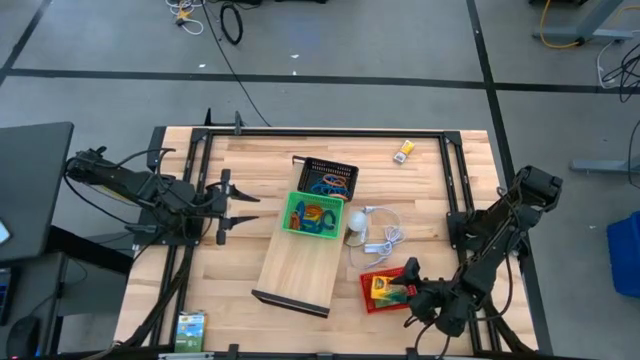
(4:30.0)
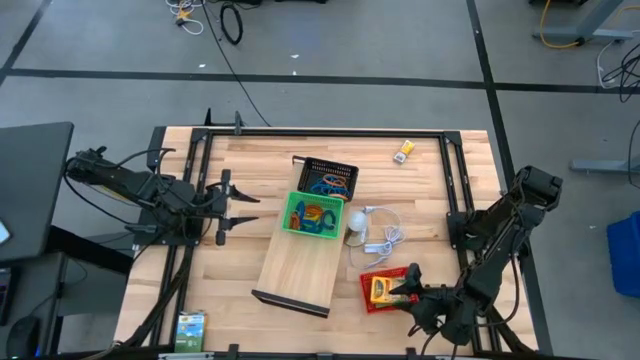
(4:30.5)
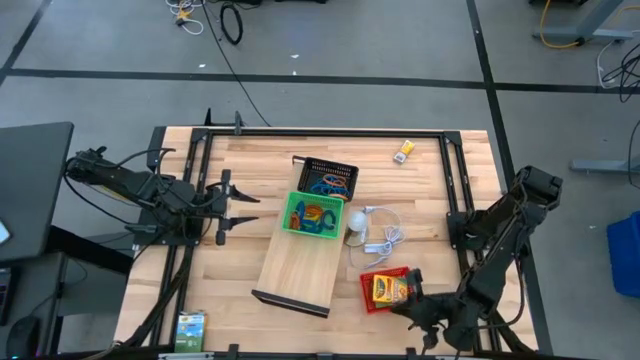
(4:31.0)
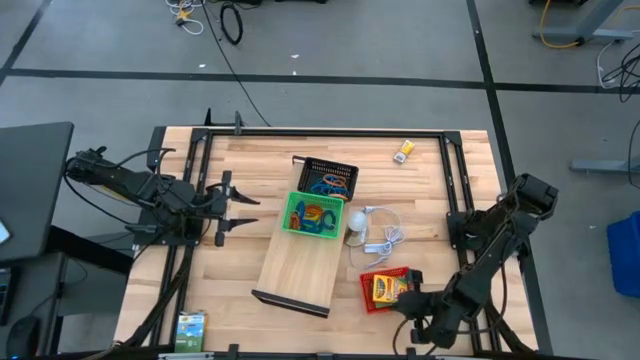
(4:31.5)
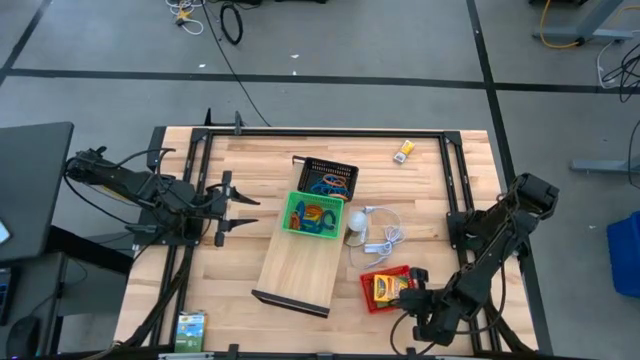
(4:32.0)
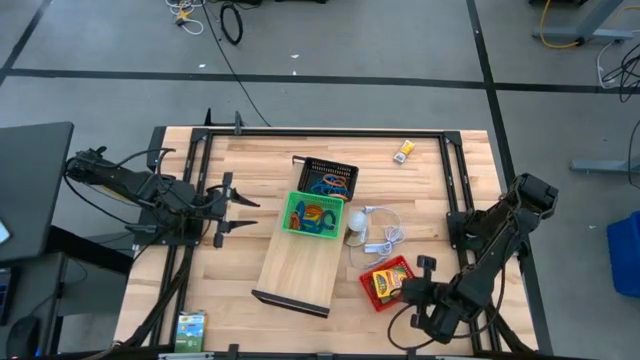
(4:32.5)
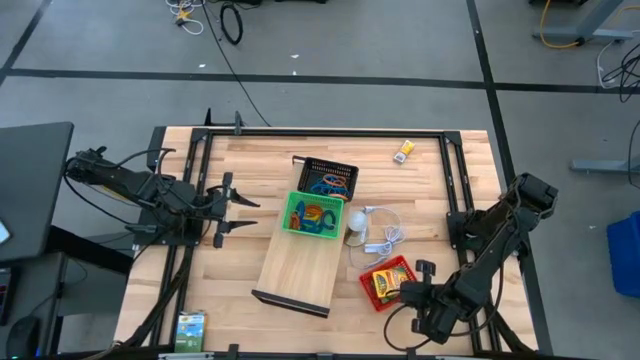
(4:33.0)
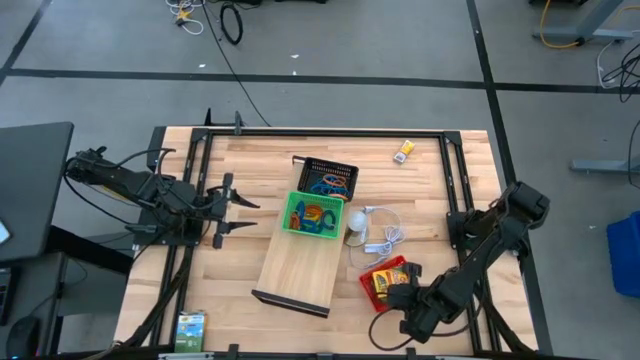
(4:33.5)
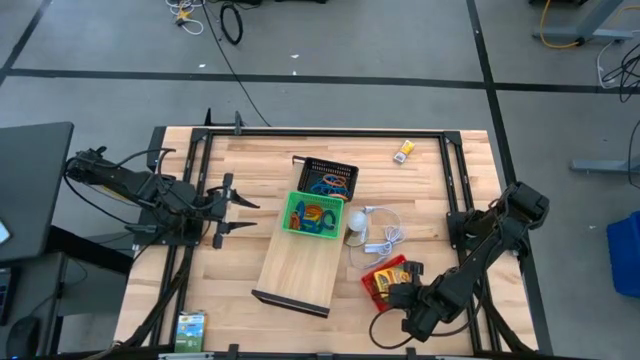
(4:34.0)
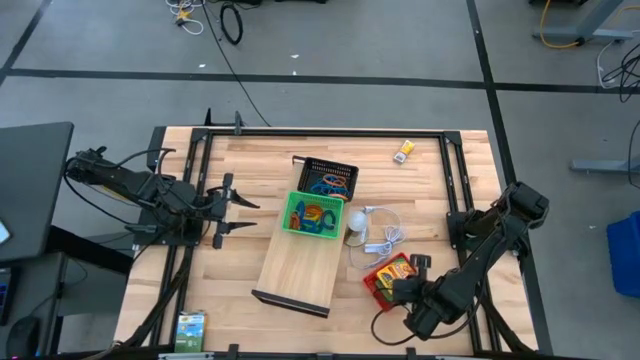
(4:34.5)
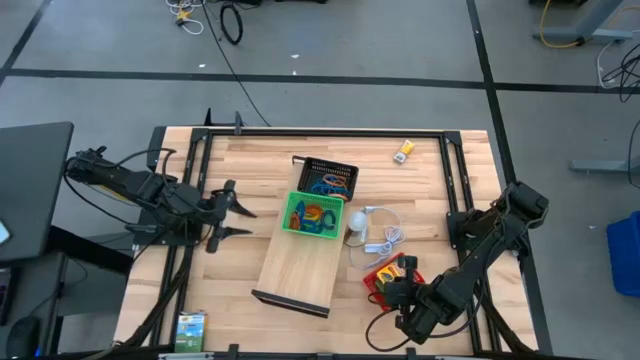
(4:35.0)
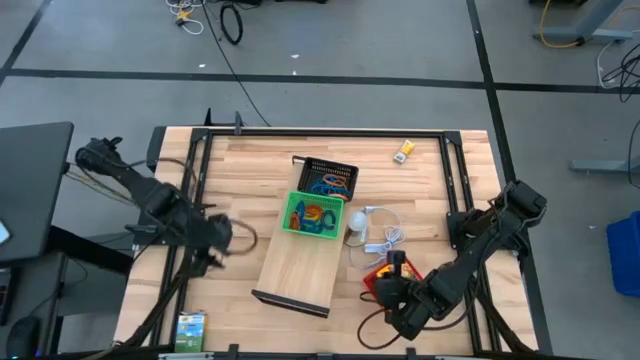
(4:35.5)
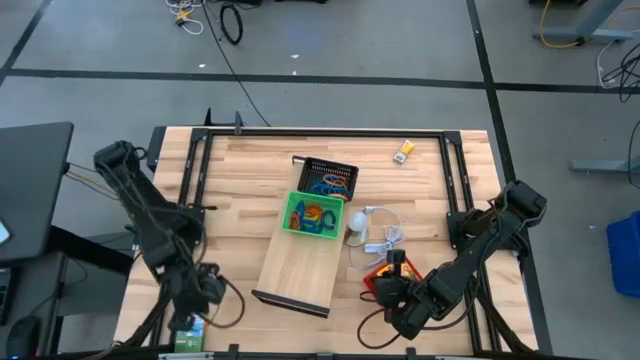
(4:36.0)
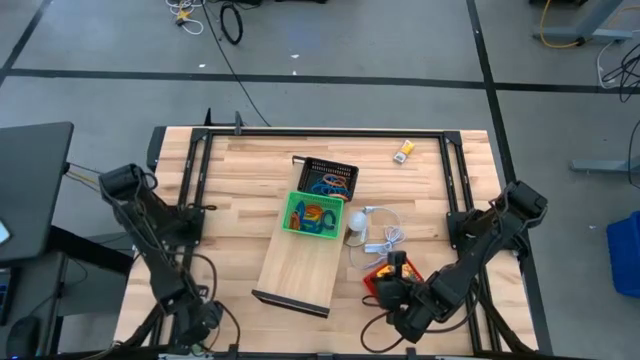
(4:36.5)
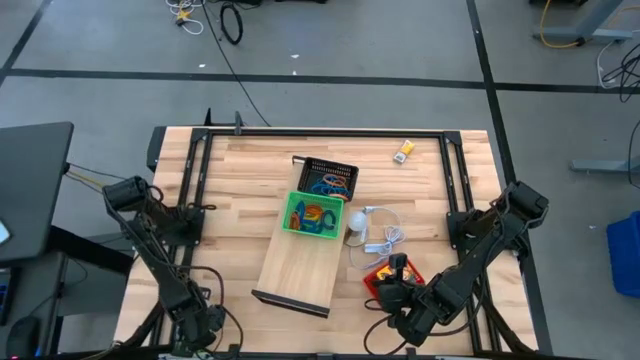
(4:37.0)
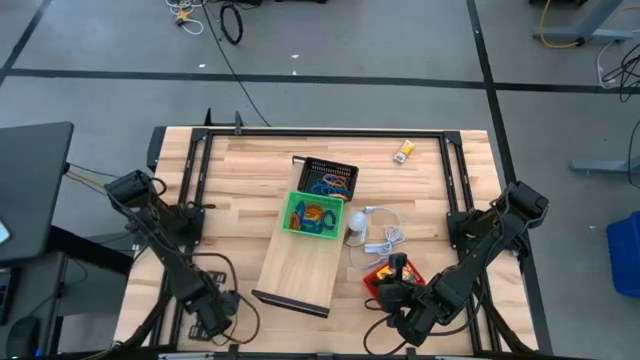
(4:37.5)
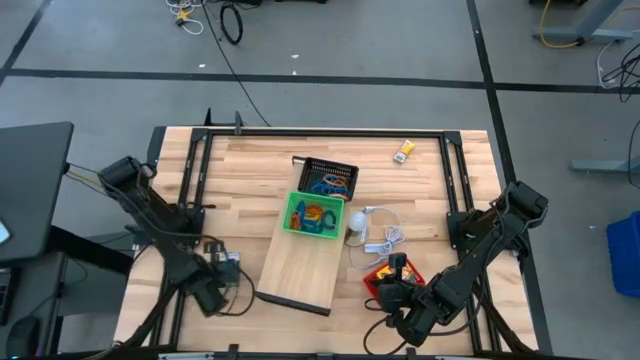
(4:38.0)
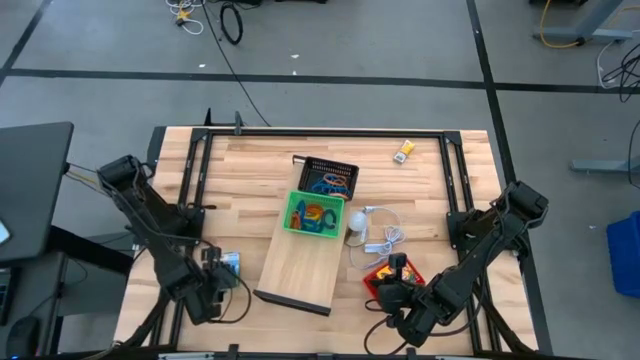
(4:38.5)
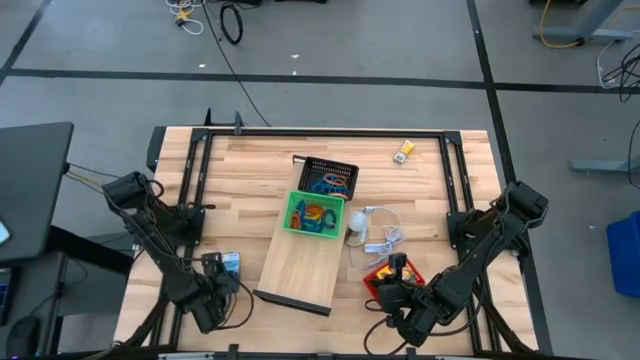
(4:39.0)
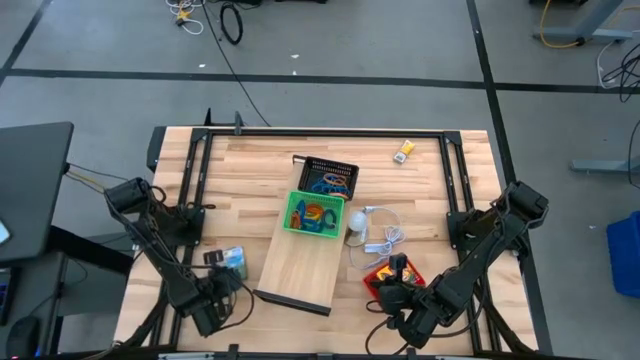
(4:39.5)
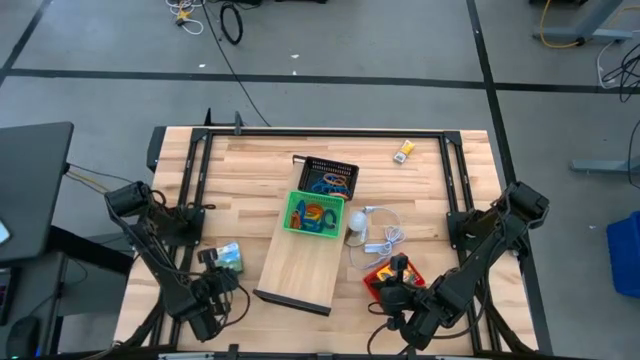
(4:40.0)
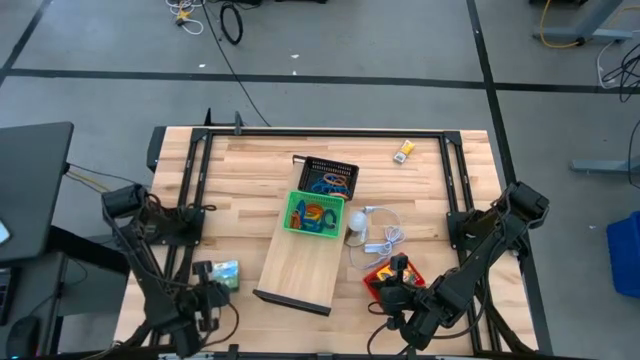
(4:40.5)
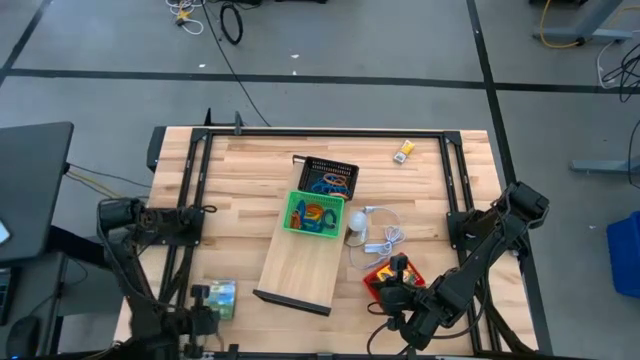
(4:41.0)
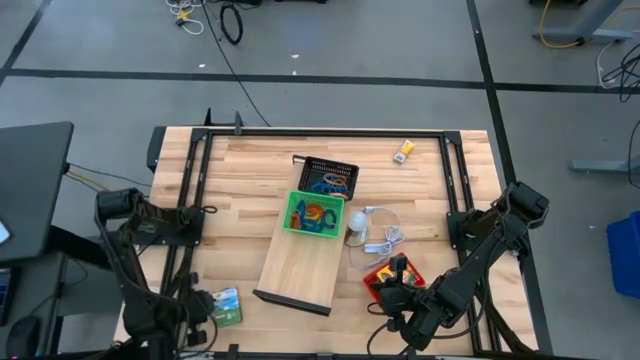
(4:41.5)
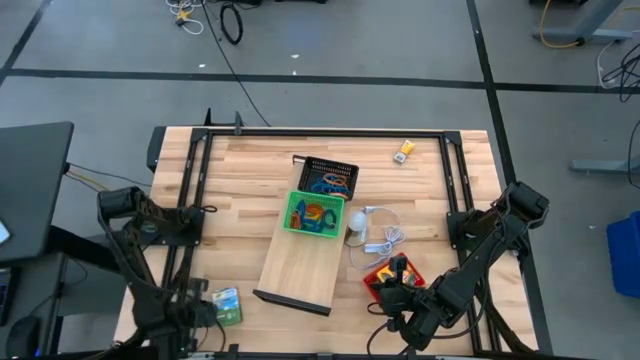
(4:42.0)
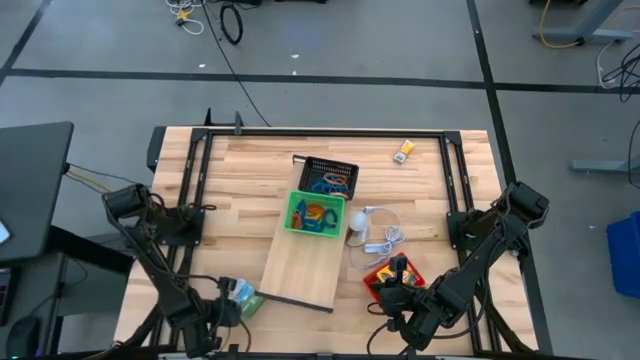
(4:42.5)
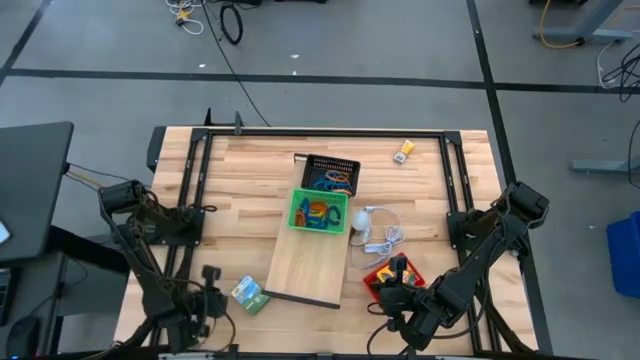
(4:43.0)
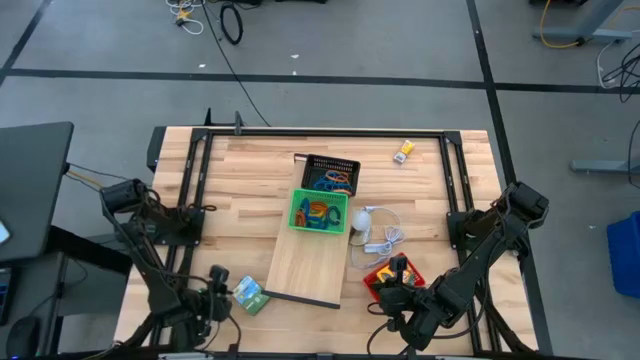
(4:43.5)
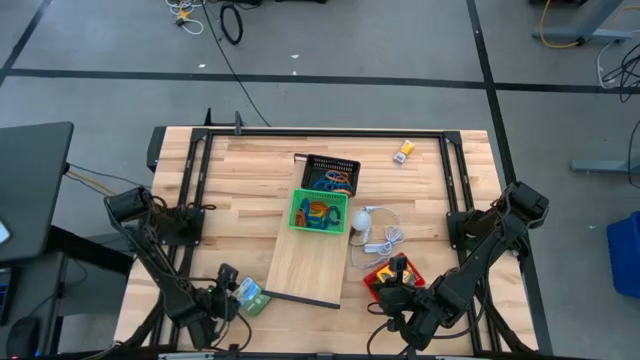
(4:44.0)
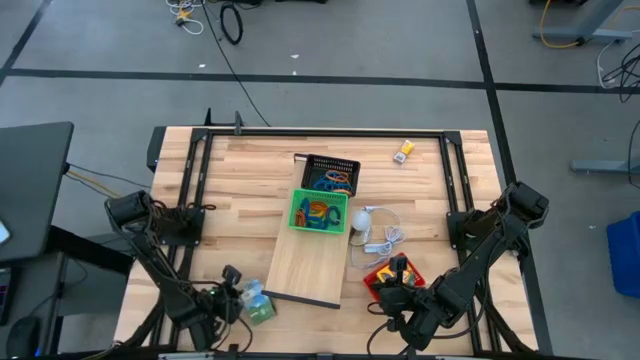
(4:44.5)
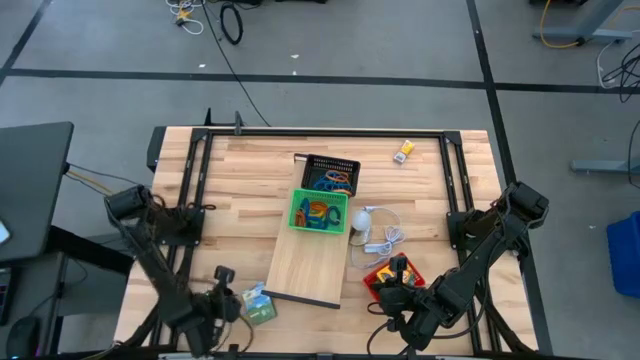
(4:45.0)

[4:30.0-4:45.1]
Task: Pick & Place Office Desk Supplies
Put the box of crayon into the red bin

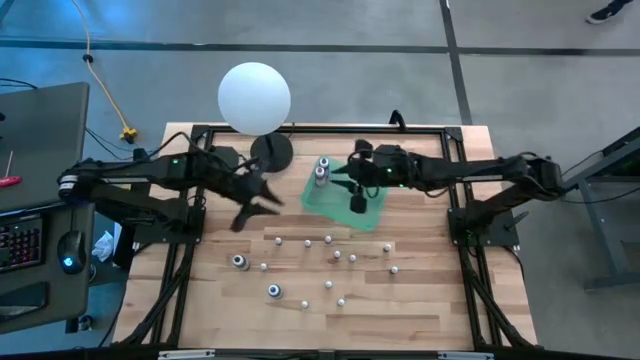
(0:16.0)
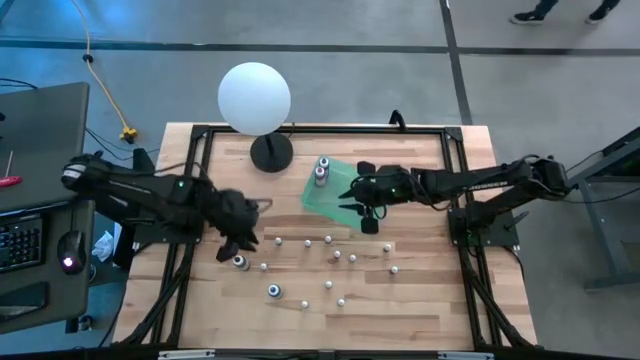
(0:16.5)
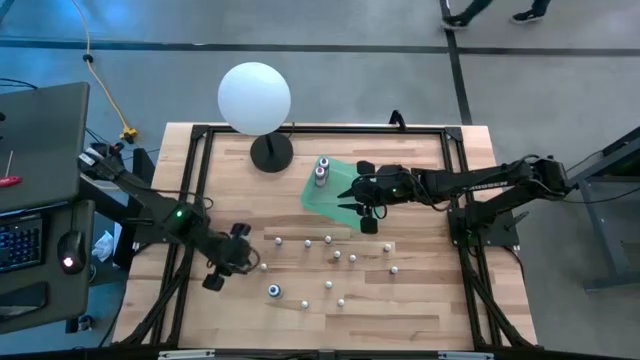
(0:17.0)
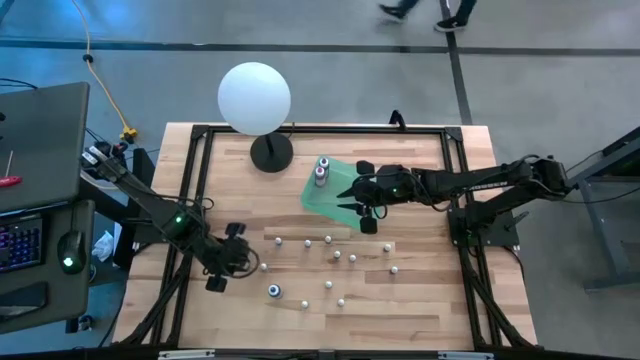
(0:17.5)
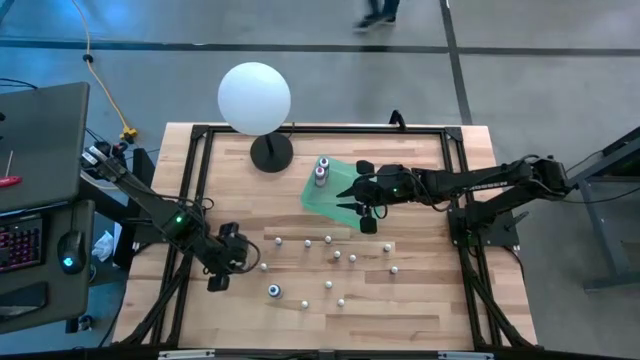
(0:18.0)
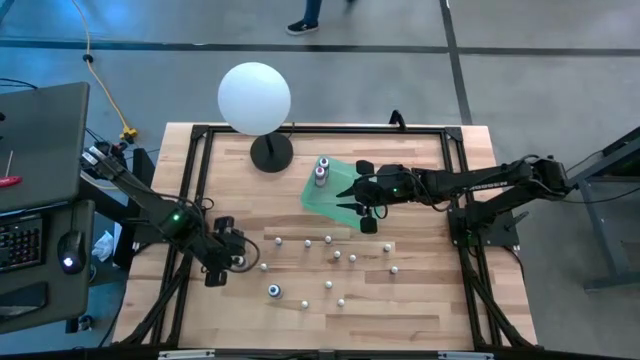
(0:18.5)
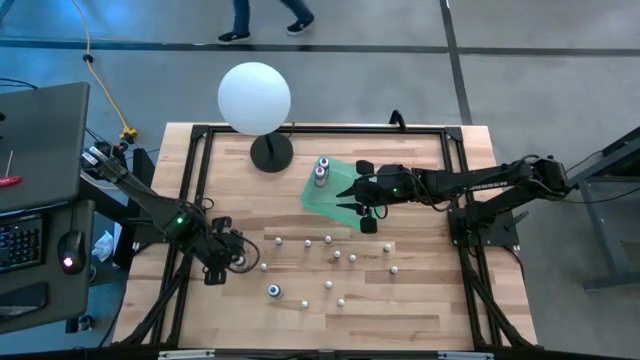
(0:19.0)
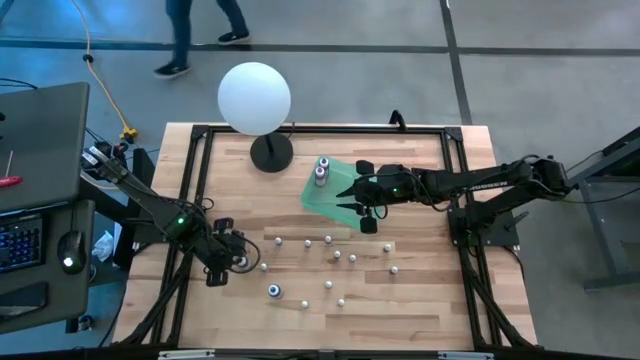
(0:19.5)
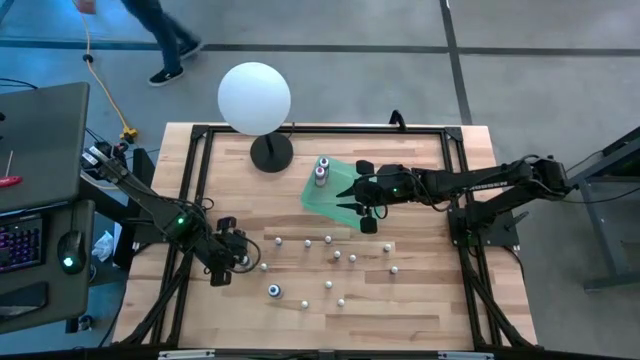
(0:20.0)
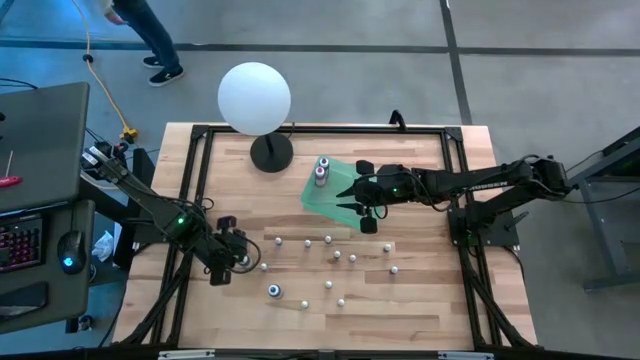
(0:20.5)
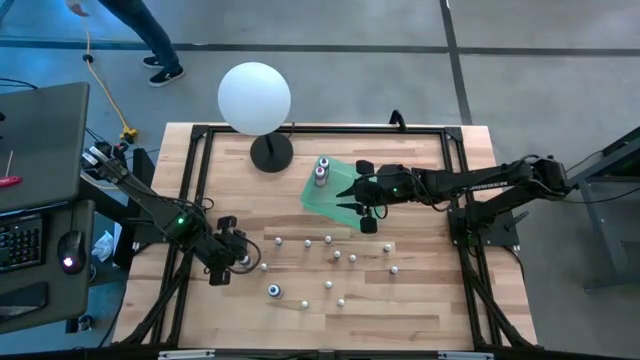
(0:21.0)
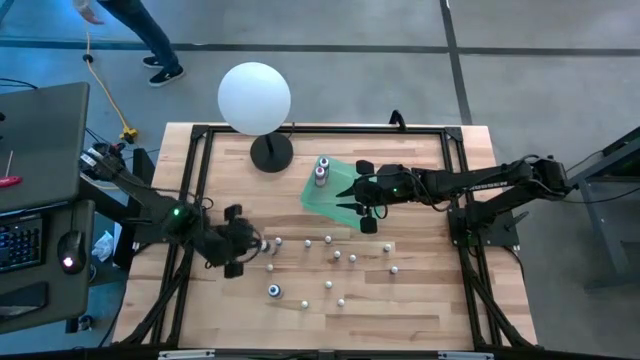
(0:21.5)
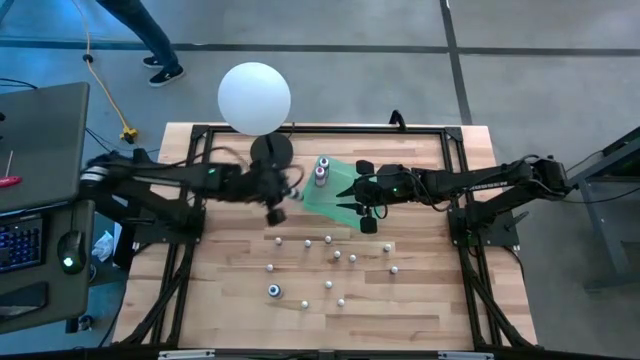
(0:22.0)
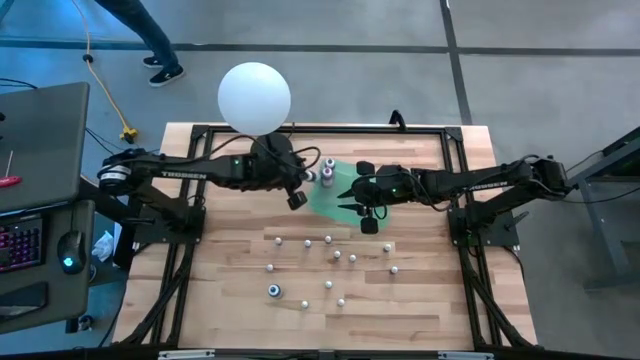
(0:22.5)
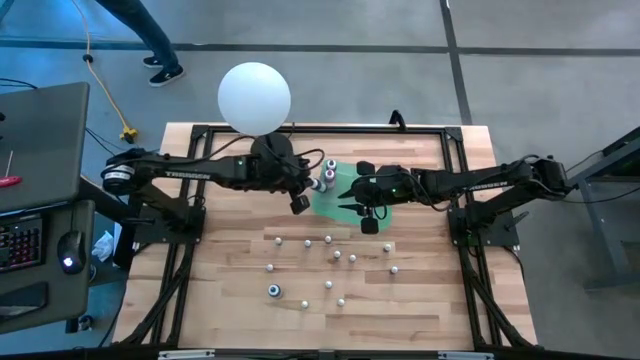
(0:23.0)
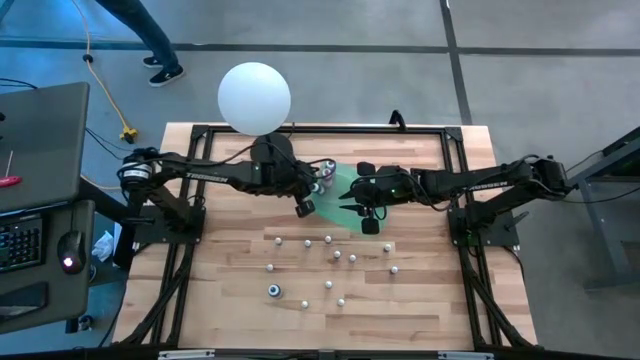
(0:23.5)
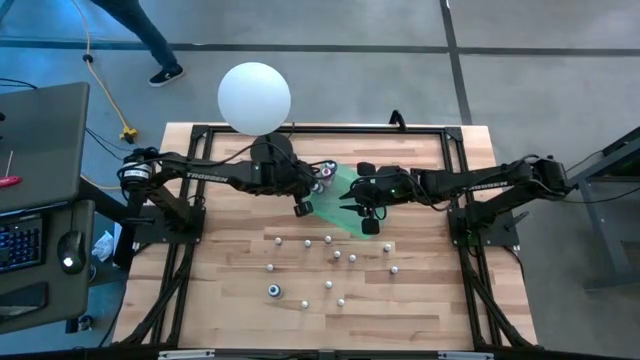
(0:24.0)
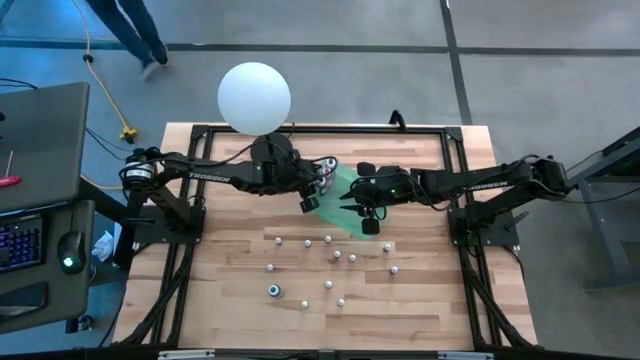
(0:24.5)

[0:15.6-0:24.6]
Task: Pick & Place food coloring
Put the large black food coloring bottle into the green container
